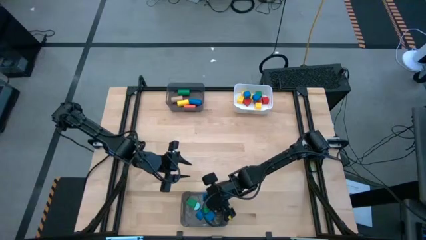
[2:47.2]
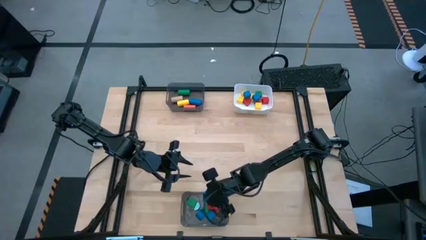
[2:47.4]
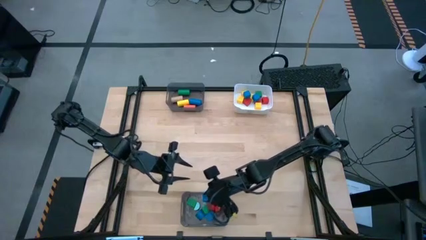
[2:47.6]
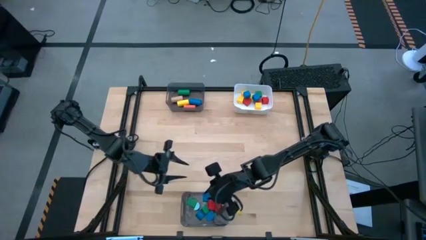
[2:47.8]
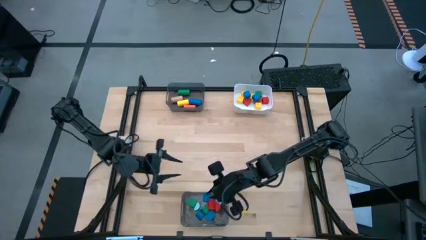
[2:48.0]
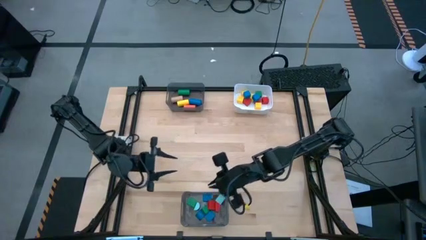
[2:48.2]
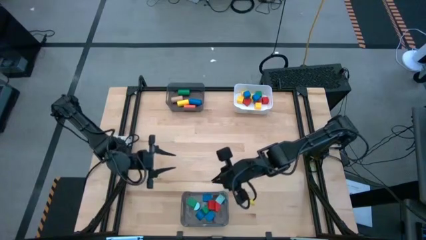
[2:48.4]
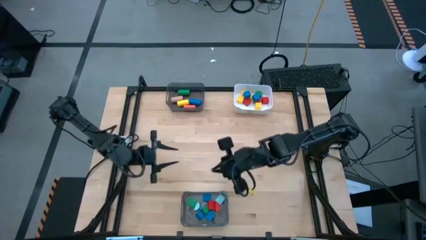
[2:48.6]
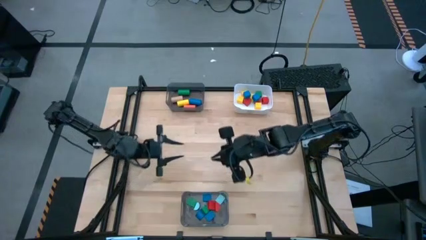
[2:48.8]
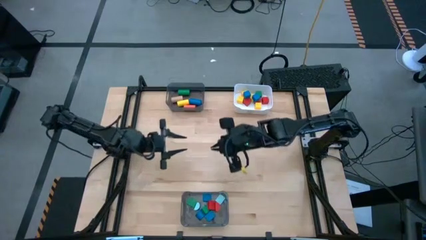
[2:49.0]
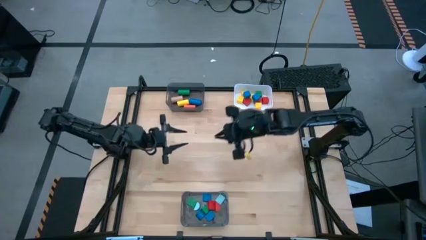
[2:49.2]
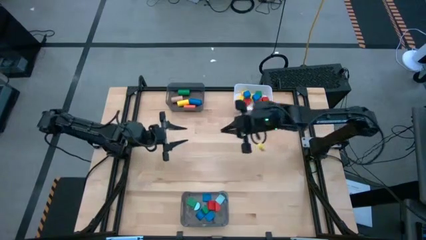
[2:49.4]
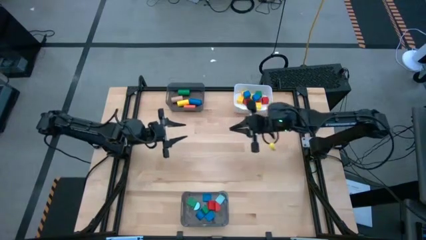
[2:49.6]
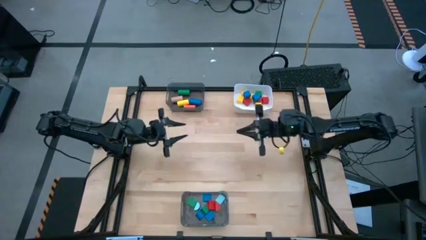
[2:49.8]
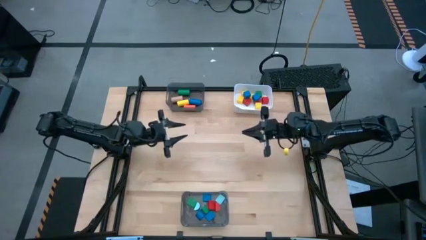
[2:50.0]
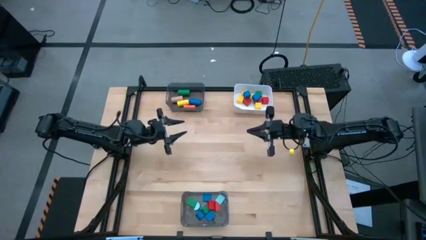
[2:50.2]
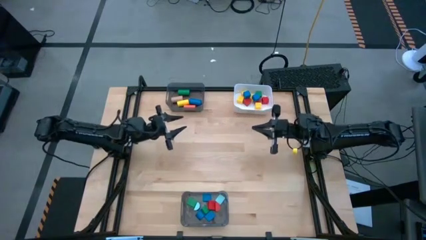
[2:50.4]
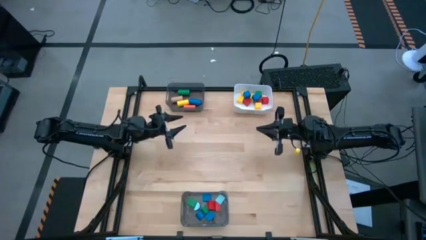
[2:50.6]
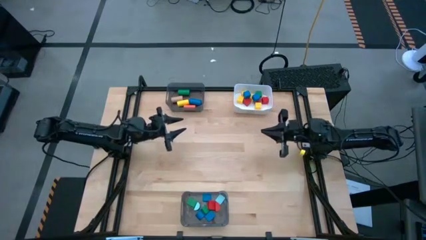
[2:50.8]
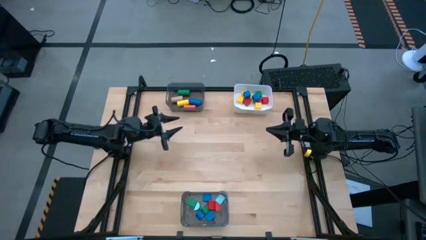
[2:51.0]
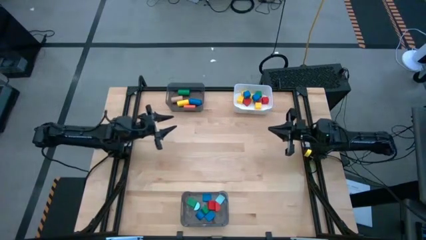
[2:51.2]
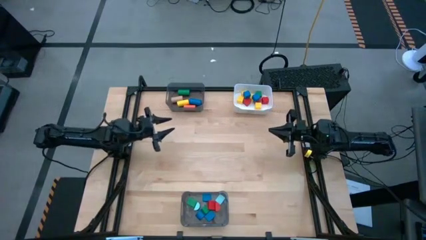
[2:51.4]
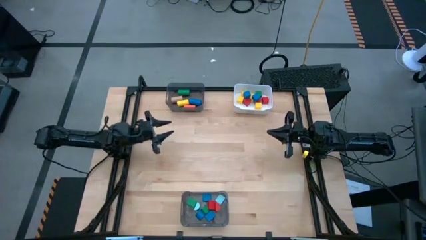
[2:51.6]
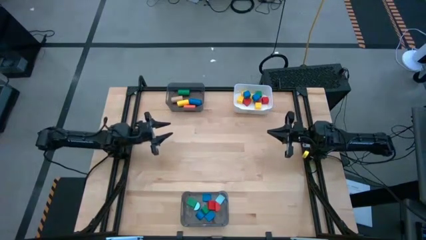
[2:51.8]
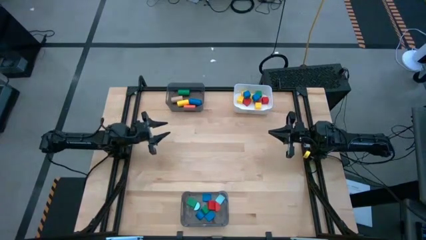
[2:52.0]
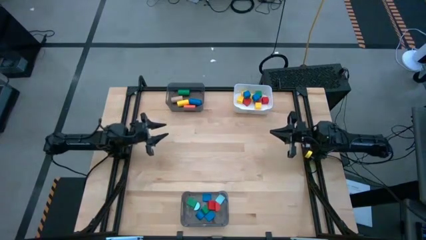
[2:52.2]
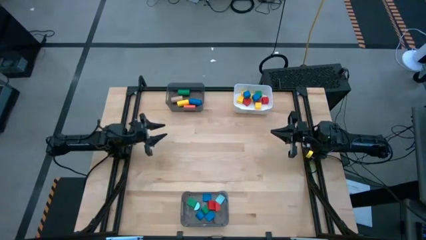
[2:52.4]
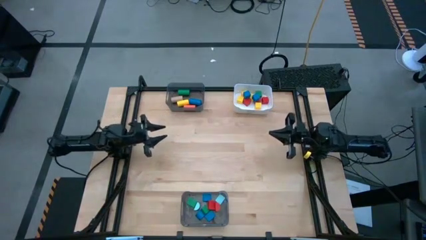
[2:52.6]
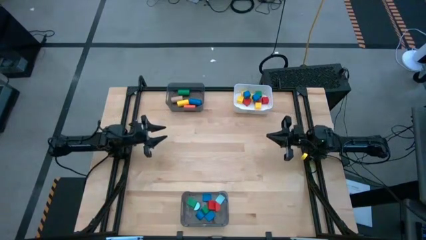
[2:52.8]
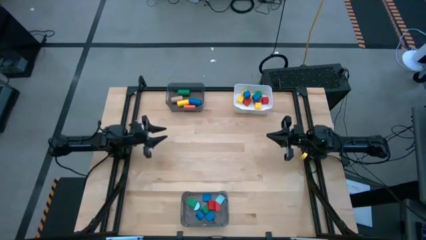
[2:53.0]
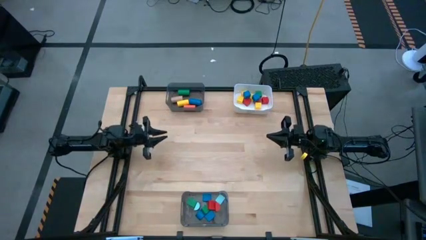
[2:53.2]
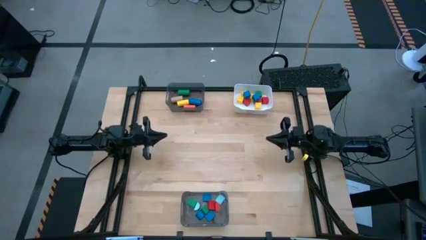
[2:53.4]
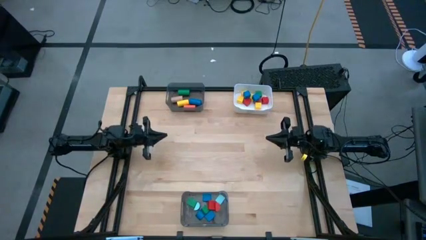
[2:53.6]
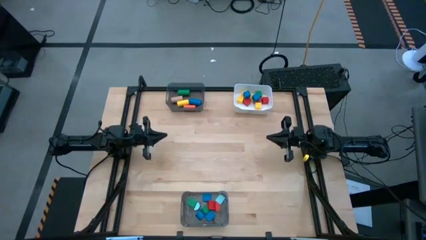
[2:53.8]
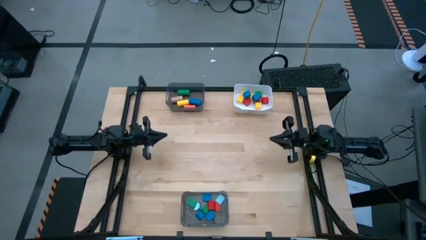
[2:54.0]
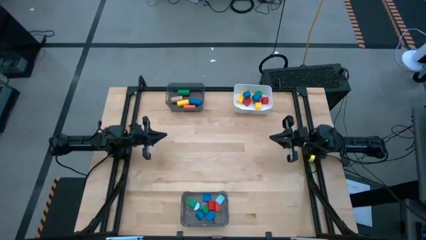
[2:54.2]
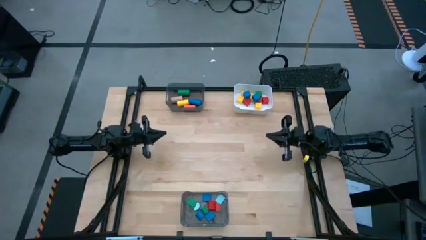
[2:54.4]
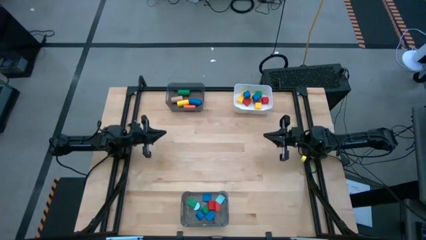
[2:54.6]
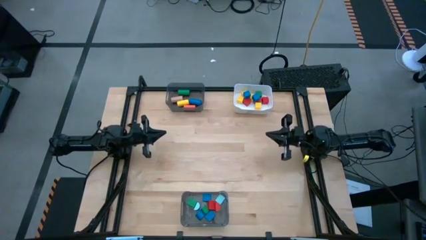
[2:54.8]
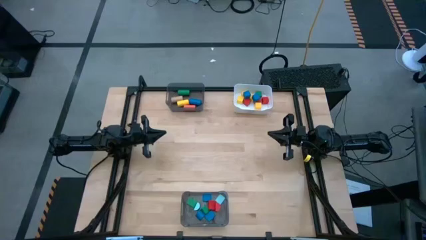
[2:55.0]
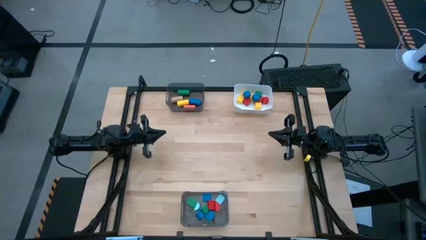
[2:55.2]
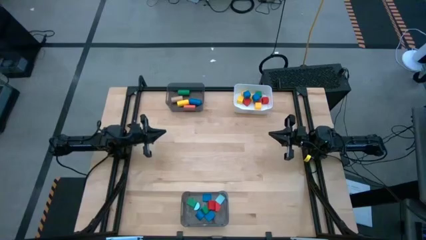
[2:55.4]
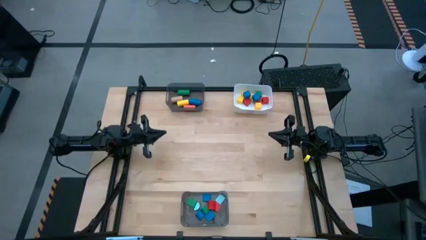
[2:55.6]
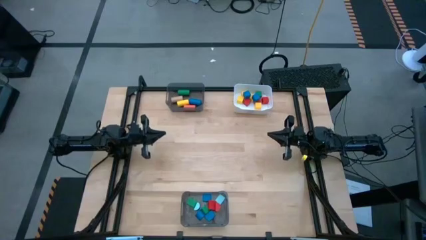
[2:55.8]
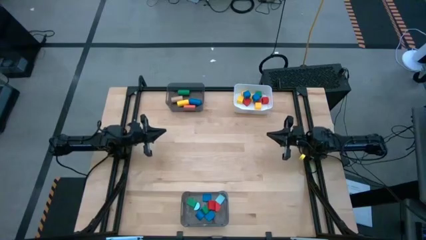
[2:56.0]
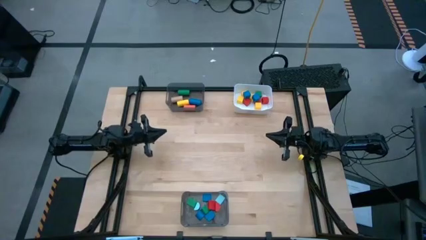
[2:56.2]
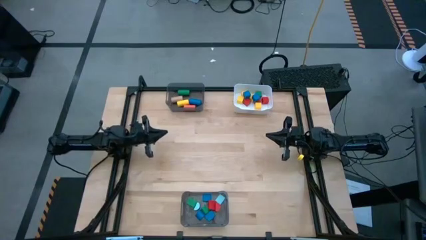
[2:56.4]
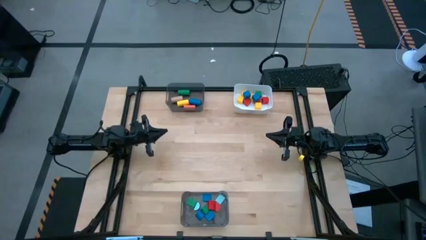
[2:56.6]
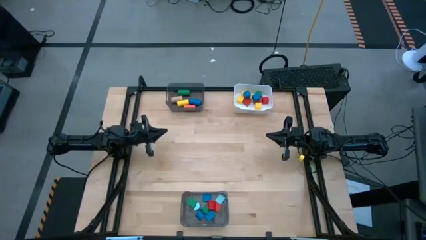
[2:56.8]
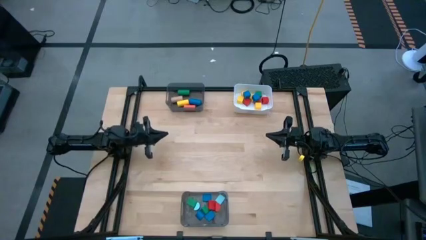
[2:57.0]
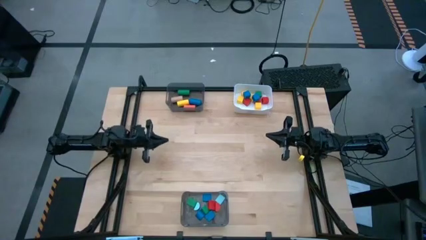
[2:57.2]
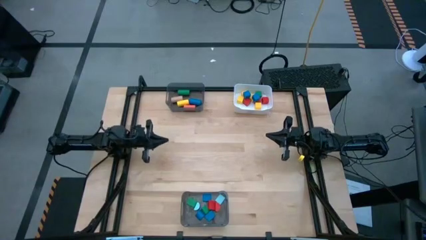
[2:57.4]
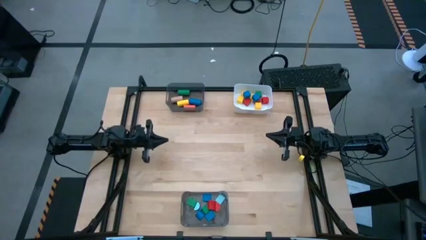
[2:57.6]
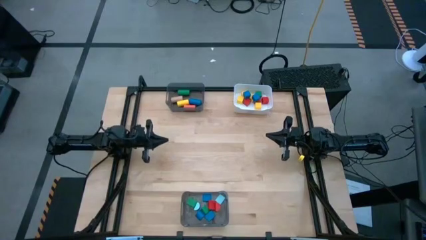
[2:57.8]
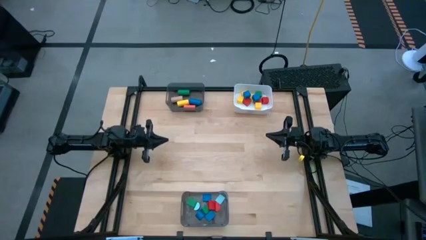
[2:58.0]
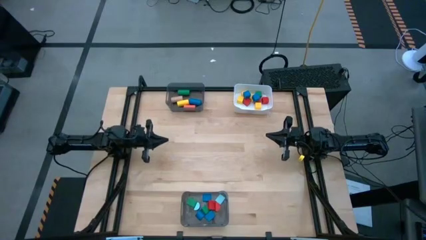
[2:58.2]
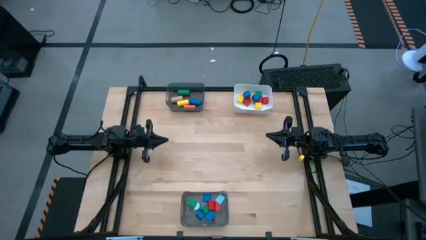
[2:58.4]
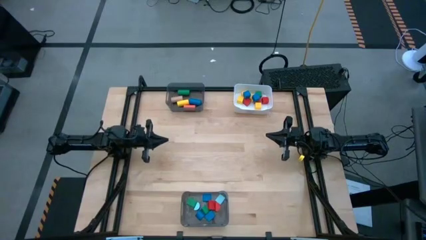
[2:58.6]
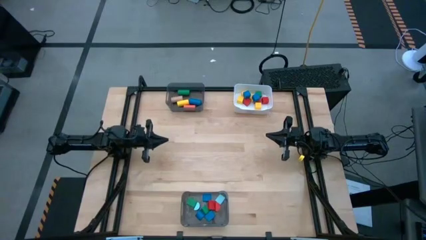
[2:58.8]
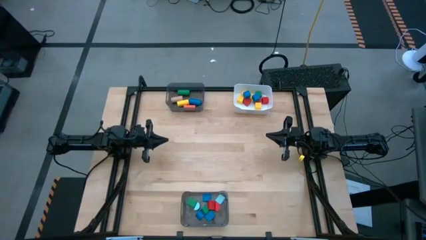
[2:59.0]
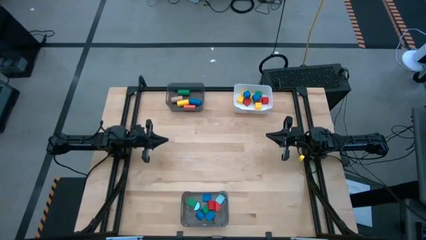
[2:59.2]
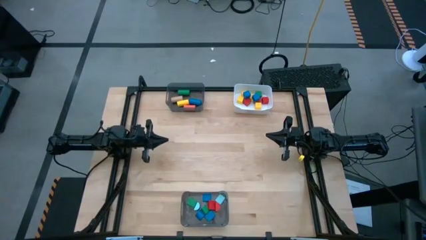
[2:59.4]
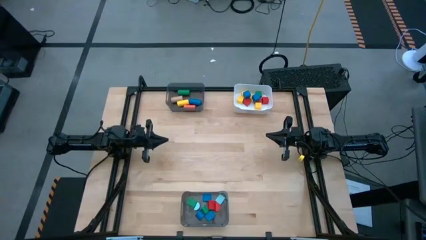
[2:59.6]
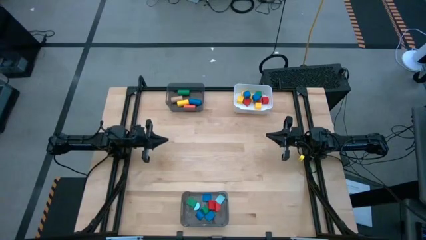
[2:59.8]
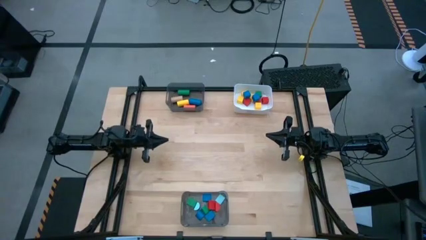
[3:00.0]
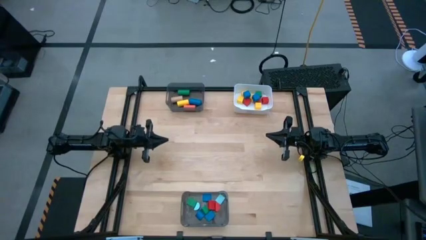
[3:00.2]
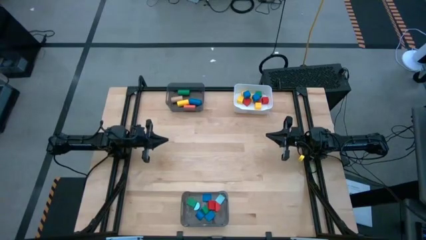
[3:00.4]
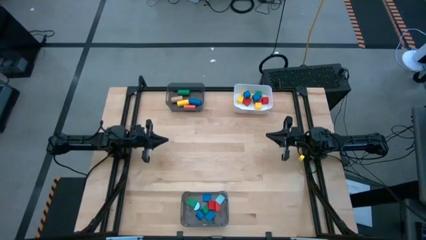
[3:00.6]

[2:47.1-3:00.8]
Task: Sort blocks by size
Return to Home Position
